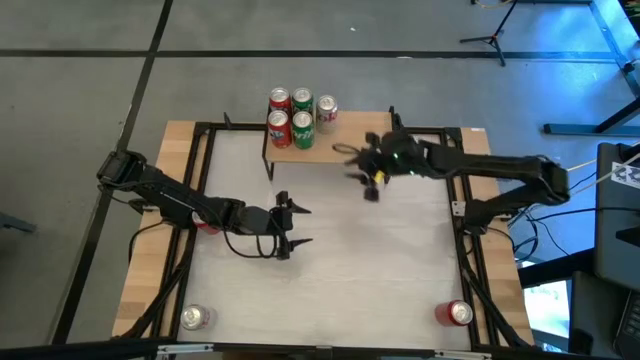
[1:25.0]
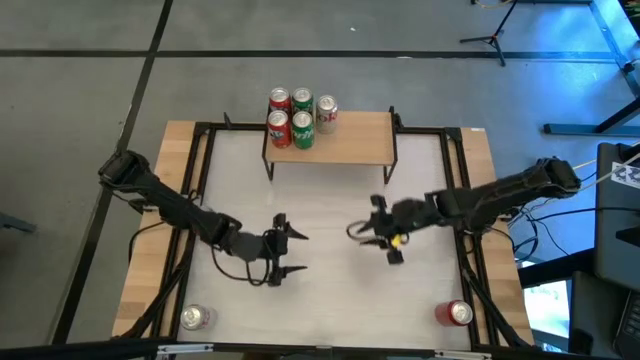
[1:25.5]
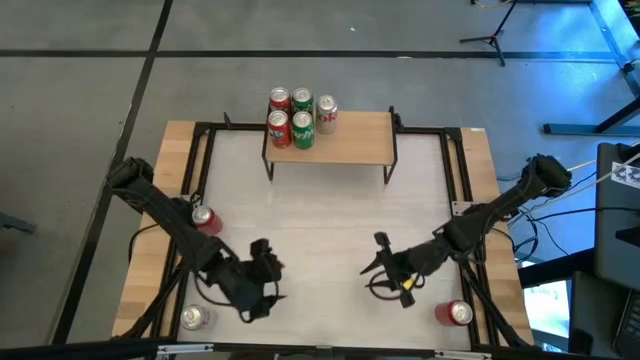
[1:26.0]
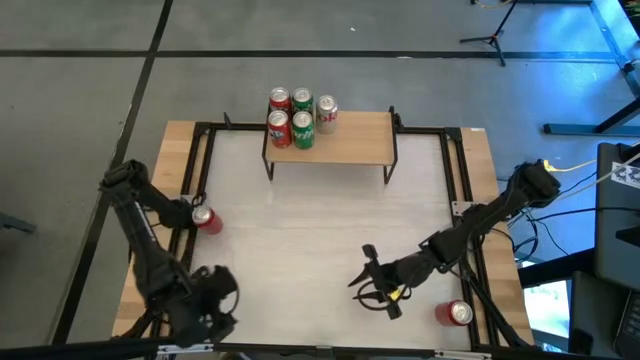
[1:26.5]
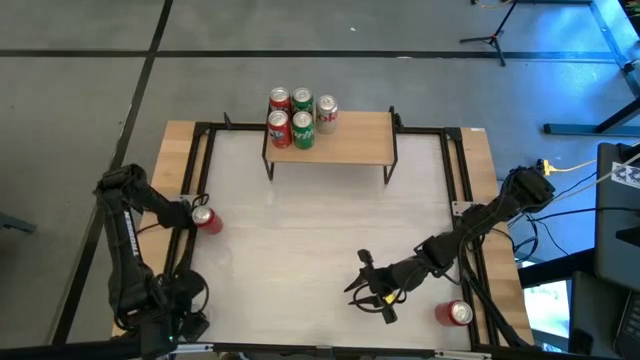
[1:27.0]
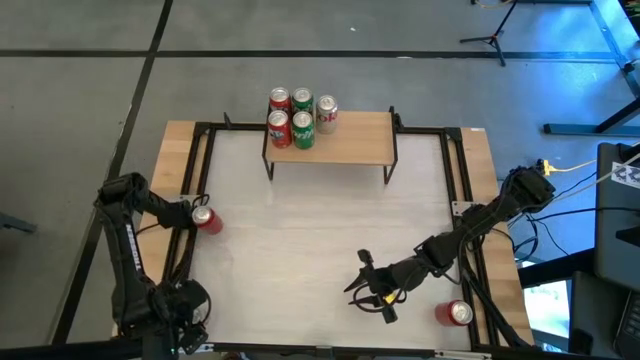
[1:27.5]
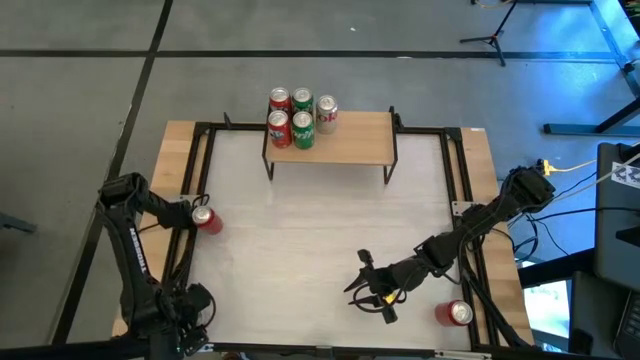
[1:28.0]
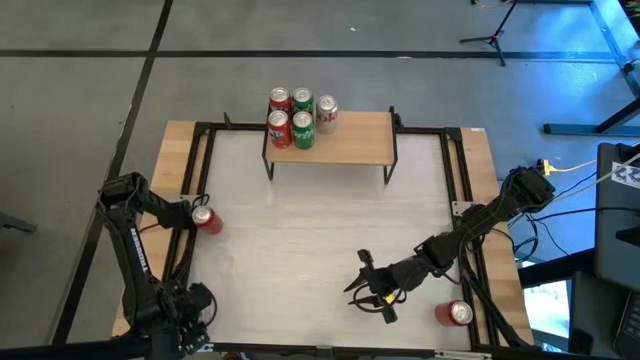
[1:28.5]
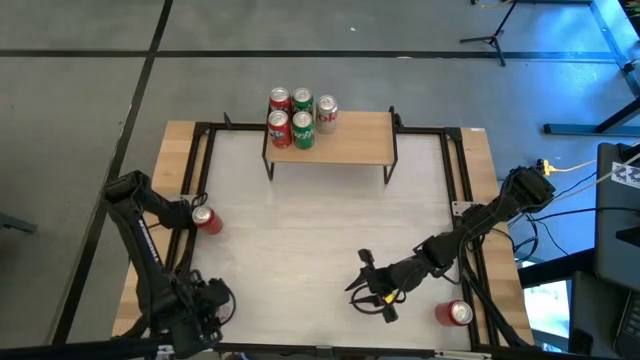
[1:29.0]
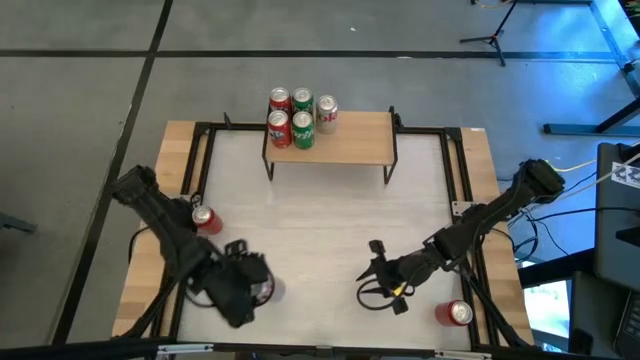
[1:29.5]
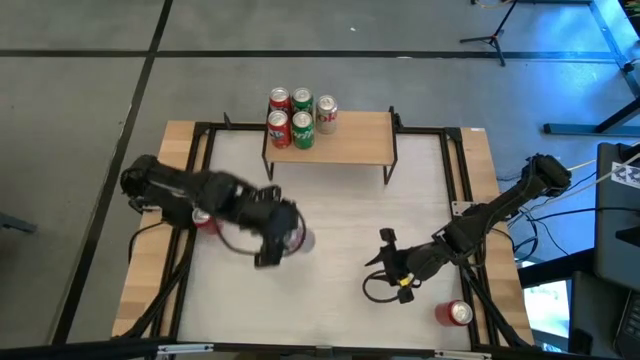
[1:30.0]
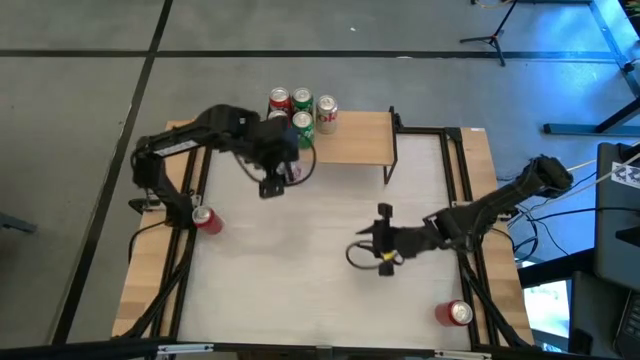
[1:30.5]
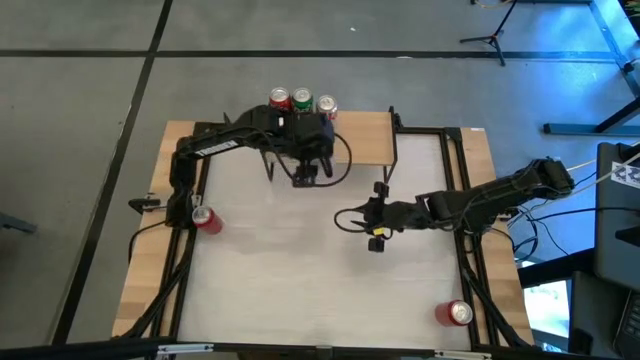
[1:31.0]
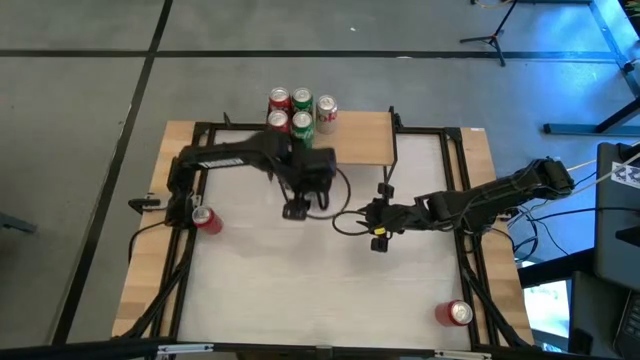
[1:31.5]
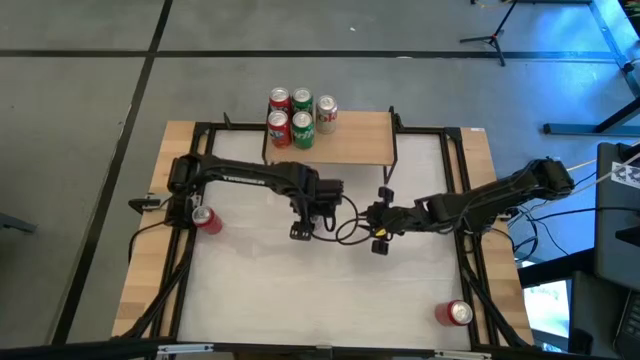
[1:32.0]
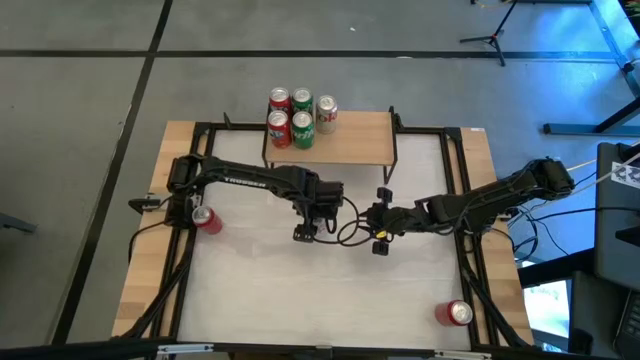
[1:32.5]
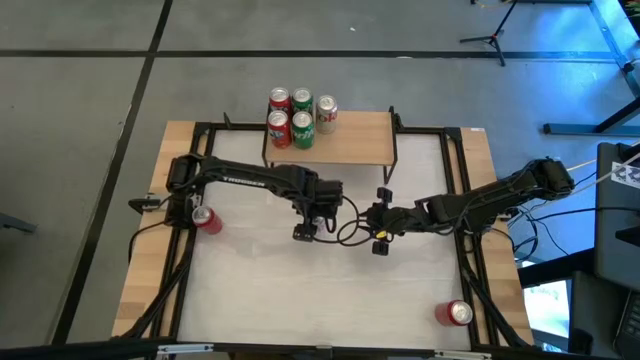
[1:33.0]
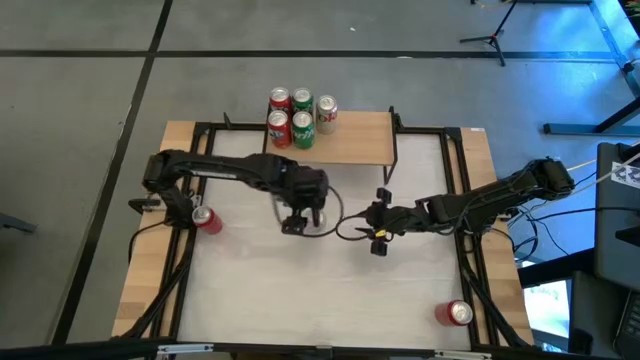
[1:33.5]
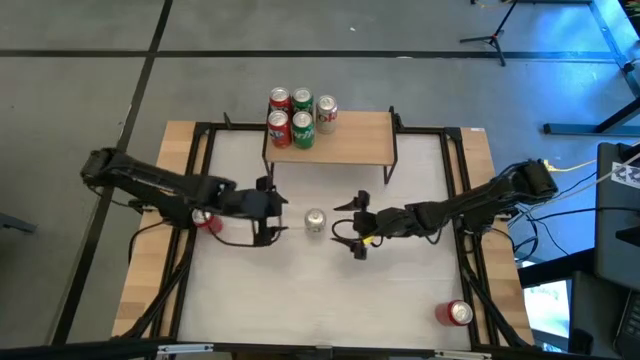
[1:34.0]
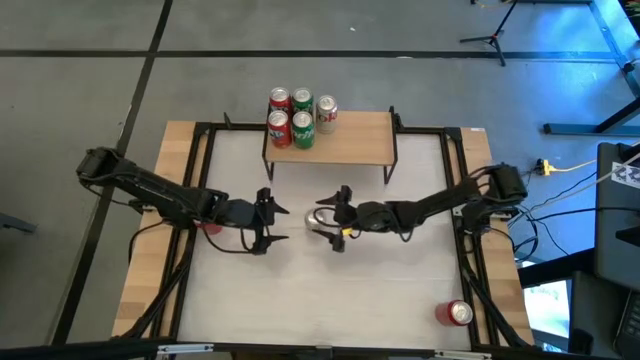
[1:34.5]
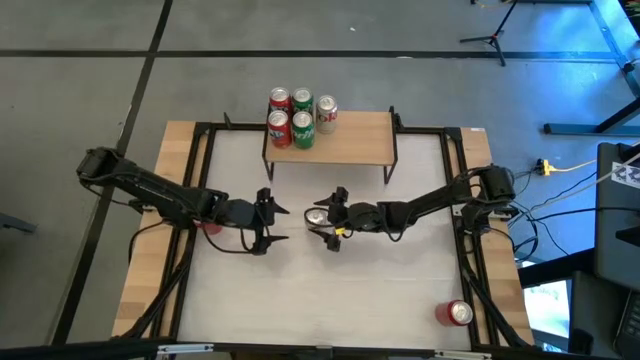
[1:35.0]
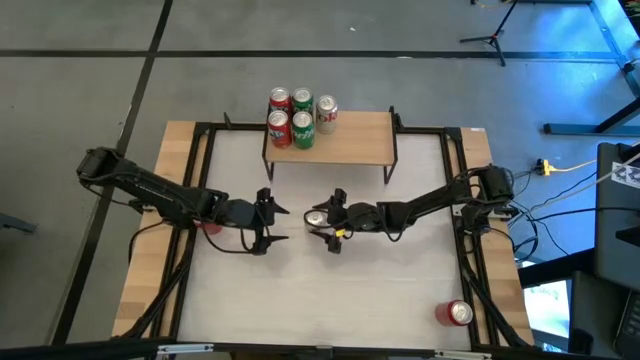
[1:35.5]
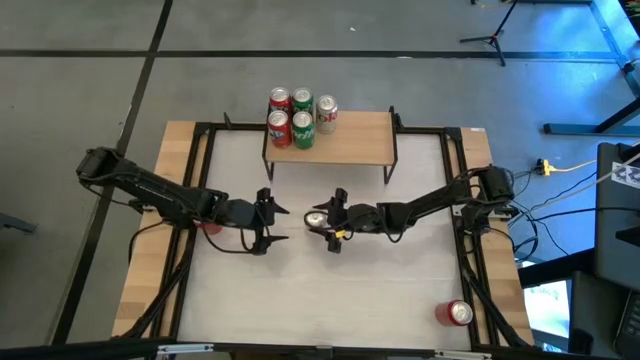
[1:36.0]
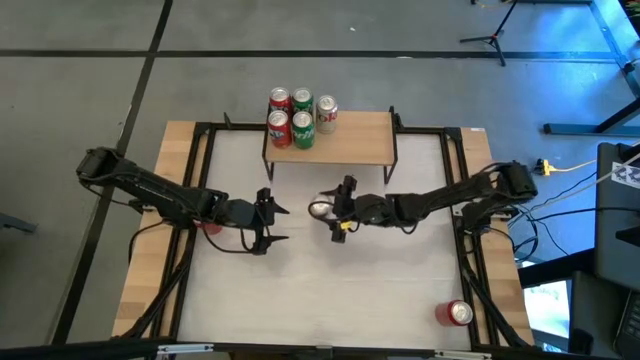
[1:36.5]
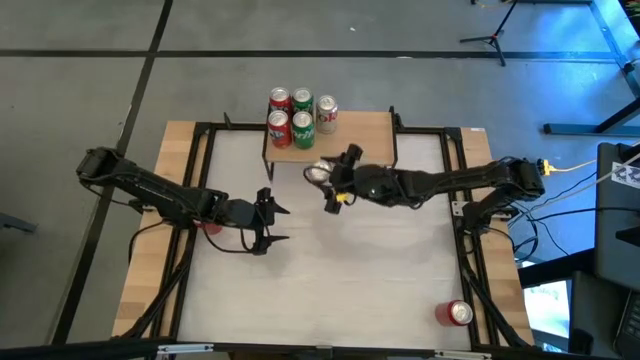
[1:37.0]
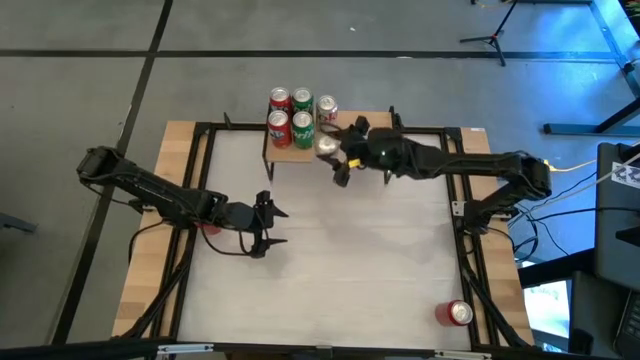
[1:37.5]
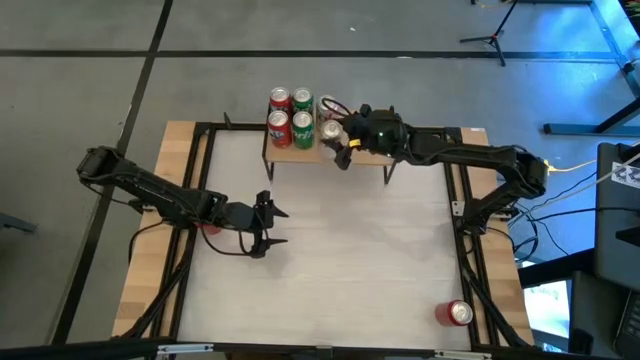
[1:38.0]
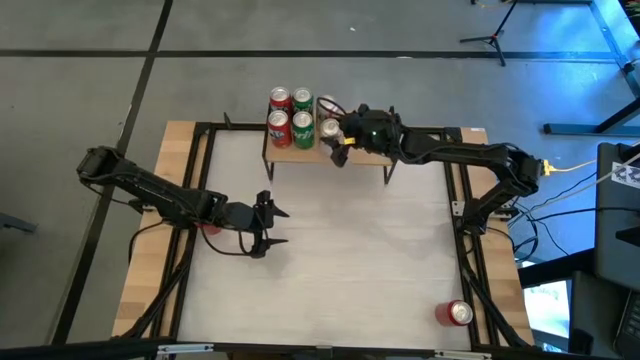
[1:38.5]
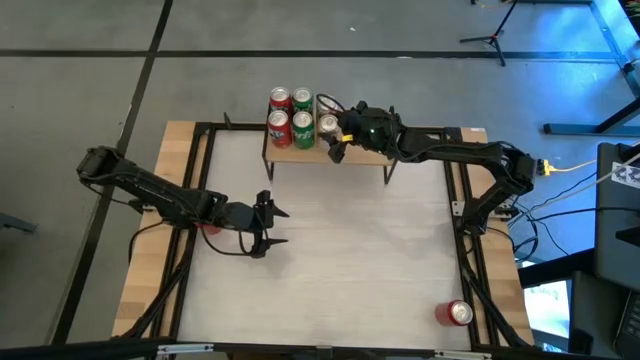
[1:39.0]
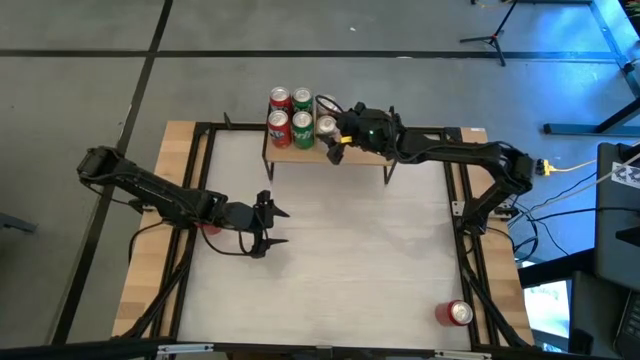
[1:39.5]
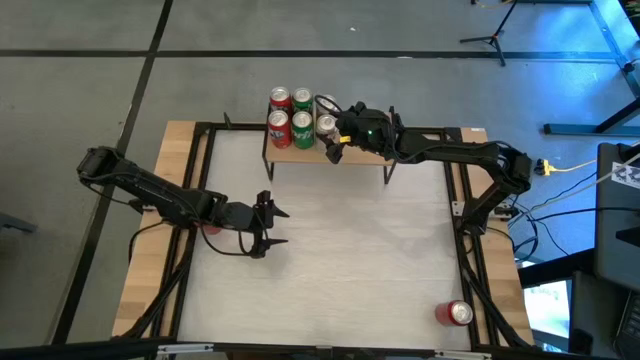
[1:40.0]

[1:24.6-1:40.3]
Task: Place canned beverage on shelf
Put the silver soda can aligned with the other silver soda can on the shelf

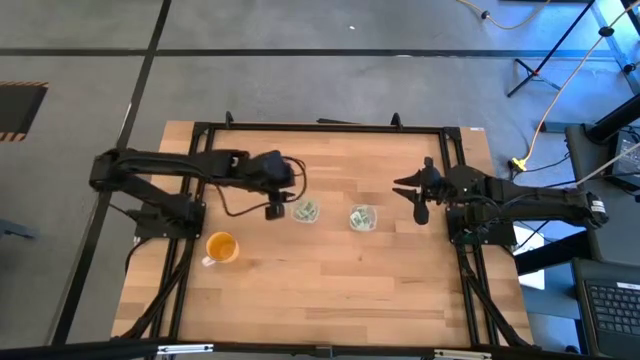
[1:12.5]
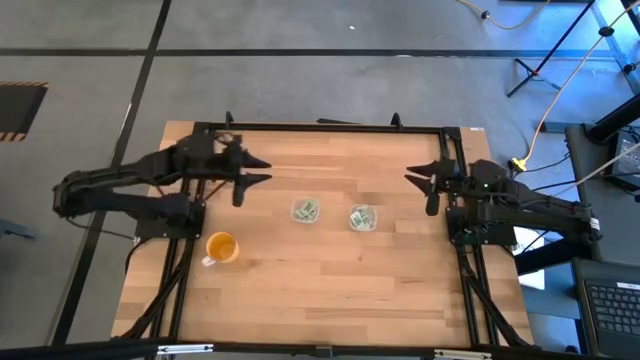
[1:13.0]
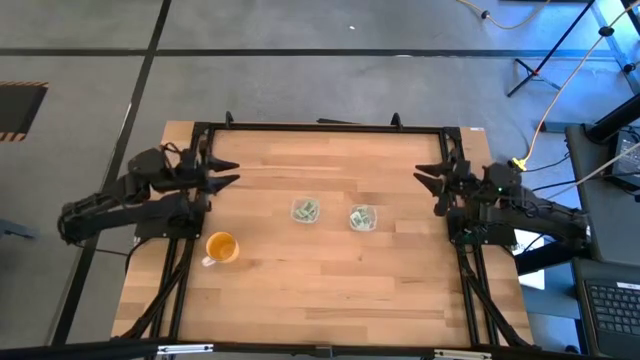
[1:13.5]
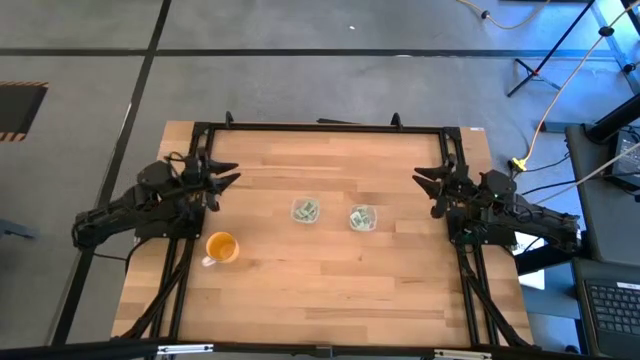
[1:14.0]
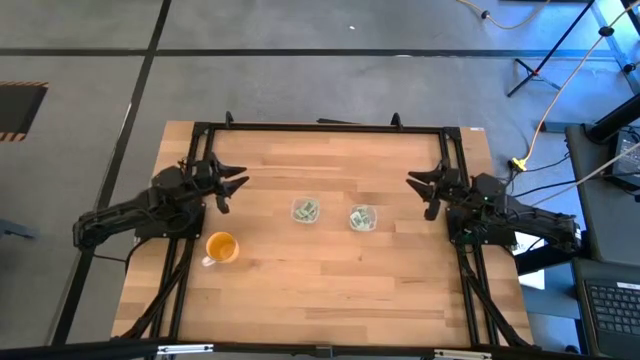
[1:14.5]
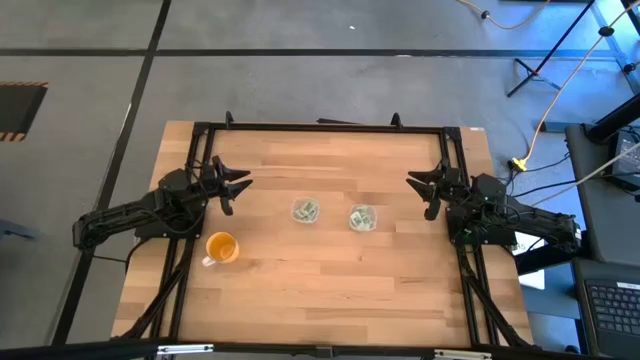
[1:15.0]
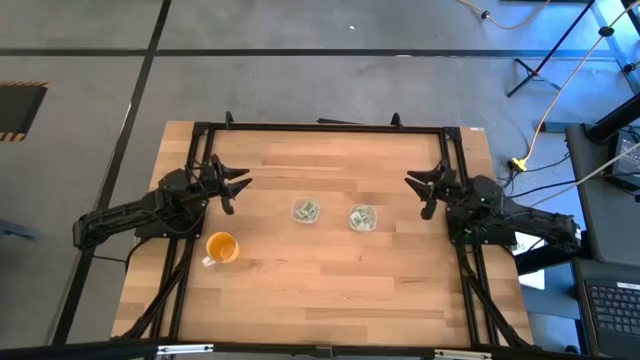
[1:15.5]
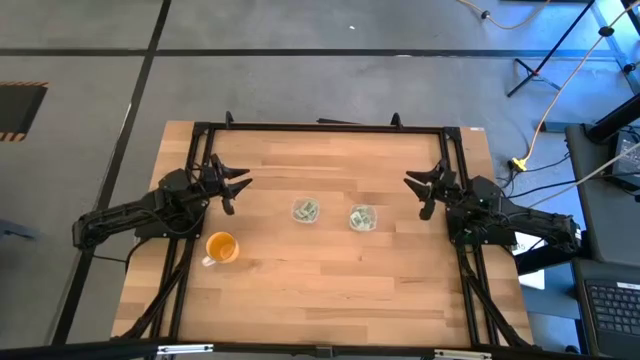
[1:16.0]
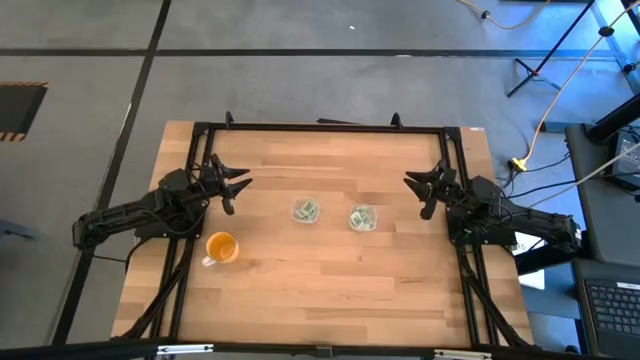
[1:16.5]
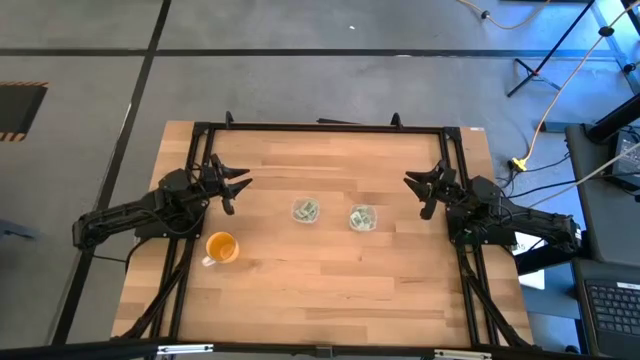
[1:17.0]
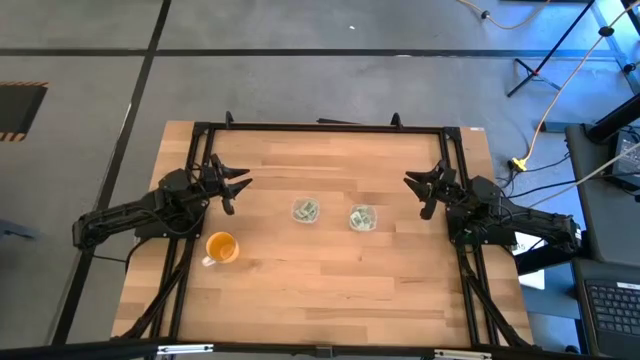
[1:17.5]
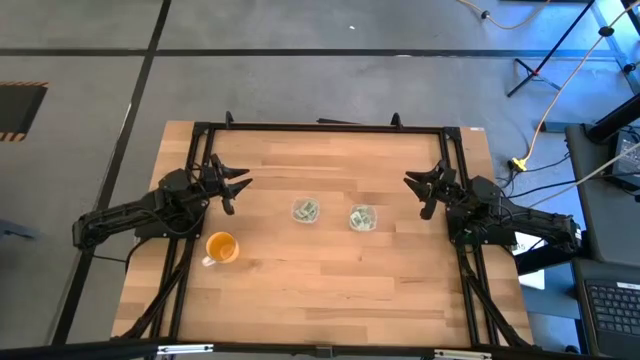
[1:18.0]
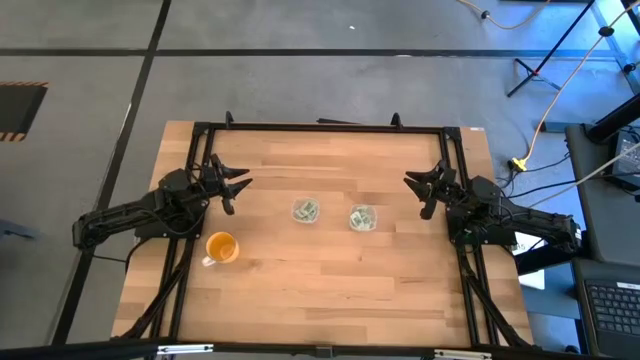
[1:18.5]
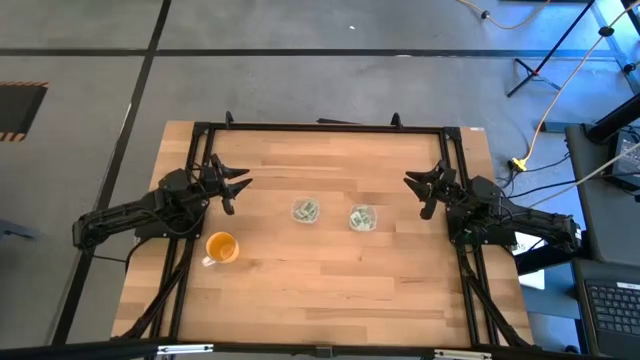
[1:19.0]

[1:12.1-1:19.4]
Task: Pick and place Stevia / Truvia into bins
Return to Home Position

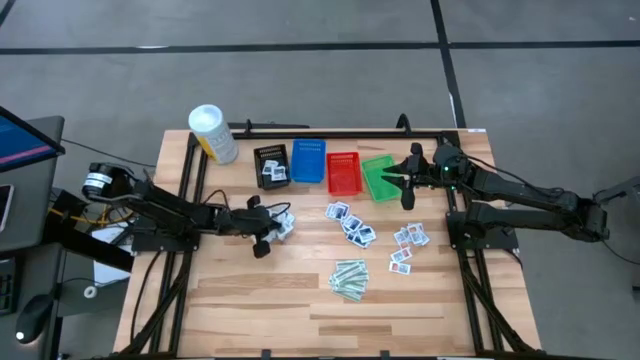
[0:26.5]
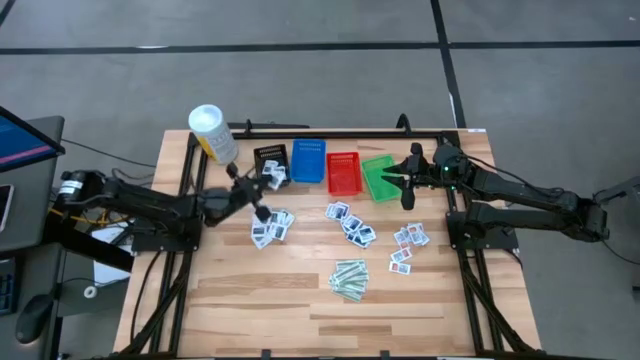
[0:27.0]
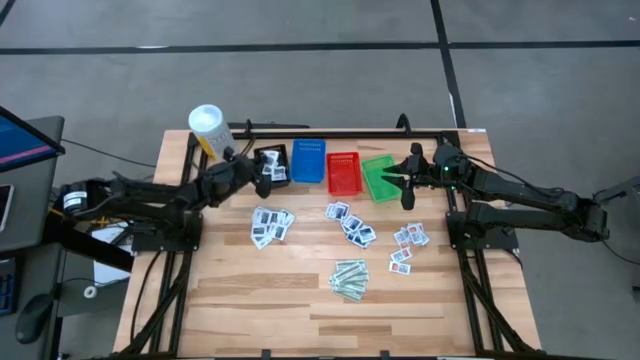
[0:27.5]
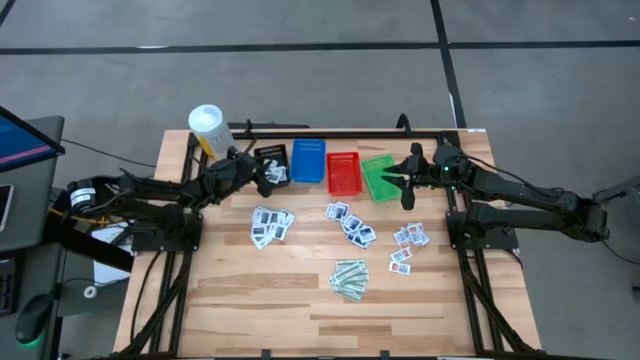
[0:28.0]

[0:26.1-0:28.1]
Task: Pick & Place First Aid Supplies
Put the gray pad into the black bin
